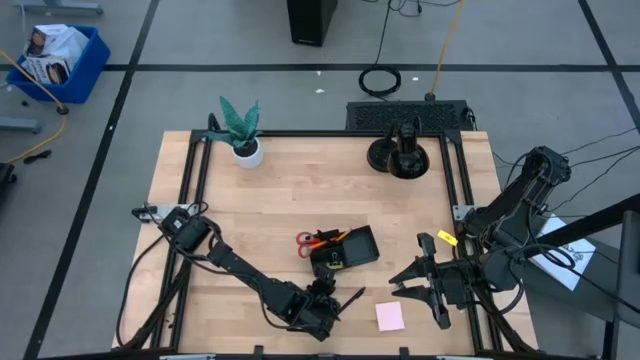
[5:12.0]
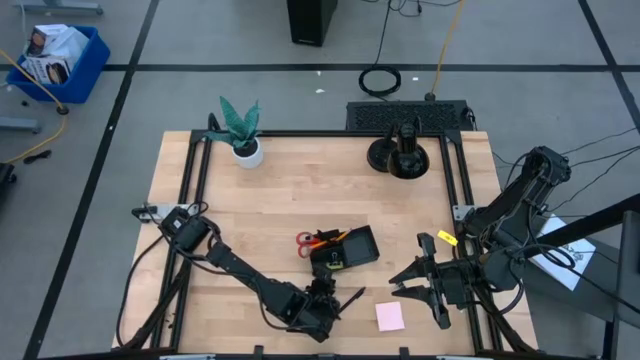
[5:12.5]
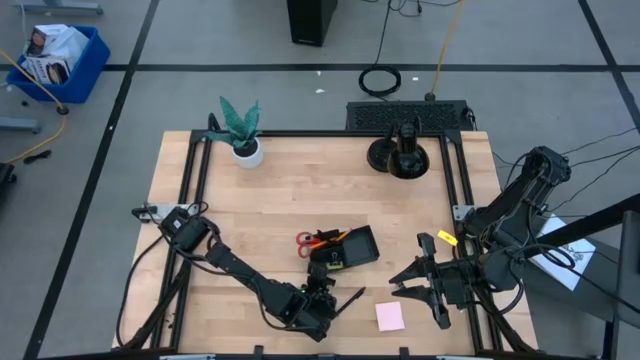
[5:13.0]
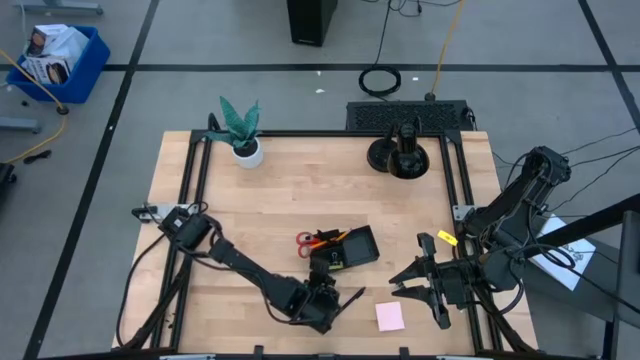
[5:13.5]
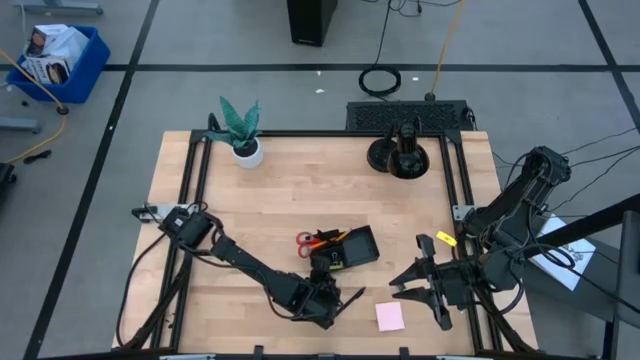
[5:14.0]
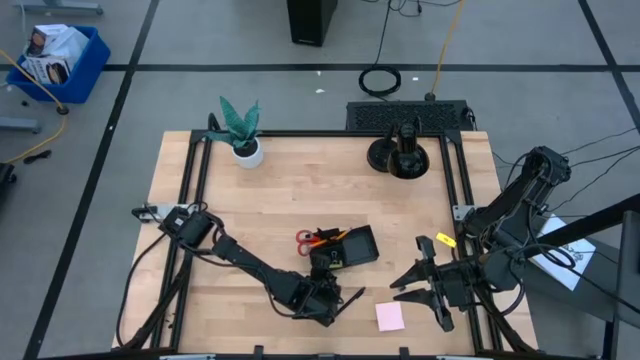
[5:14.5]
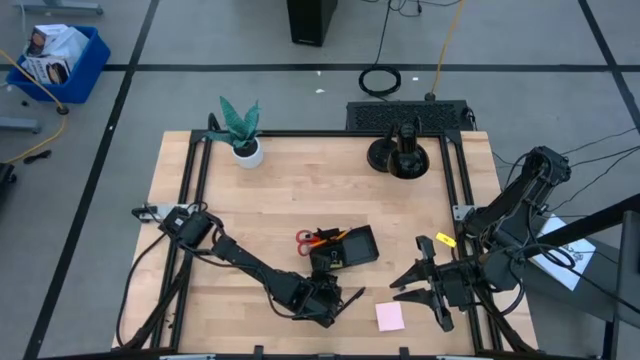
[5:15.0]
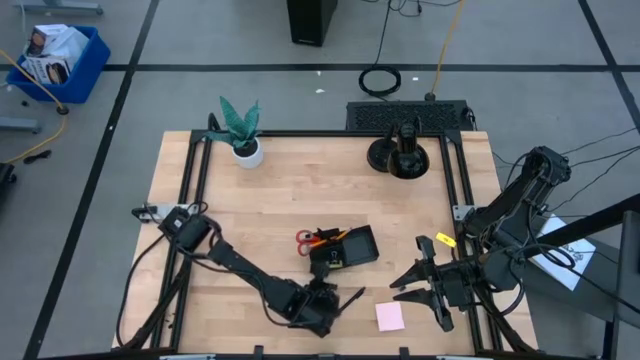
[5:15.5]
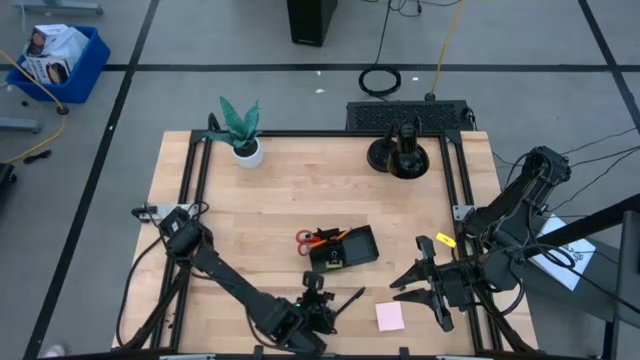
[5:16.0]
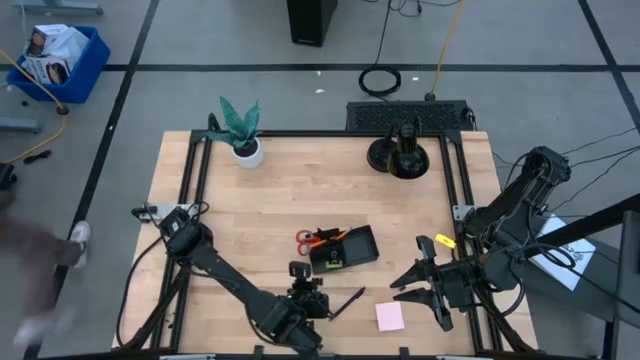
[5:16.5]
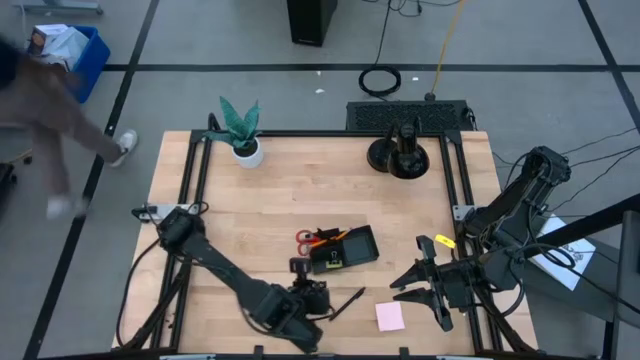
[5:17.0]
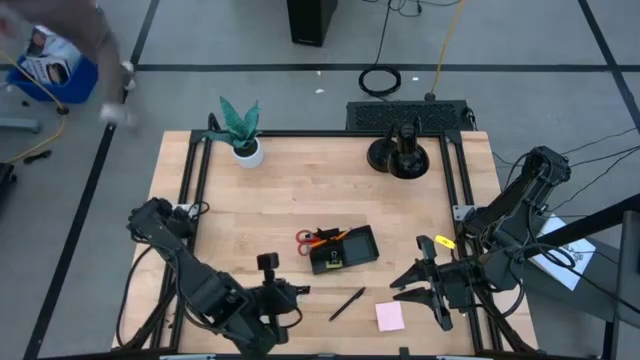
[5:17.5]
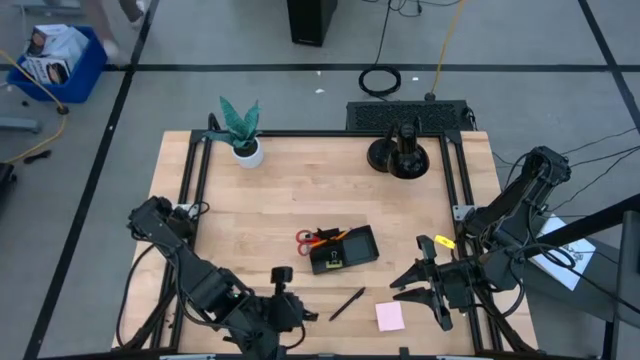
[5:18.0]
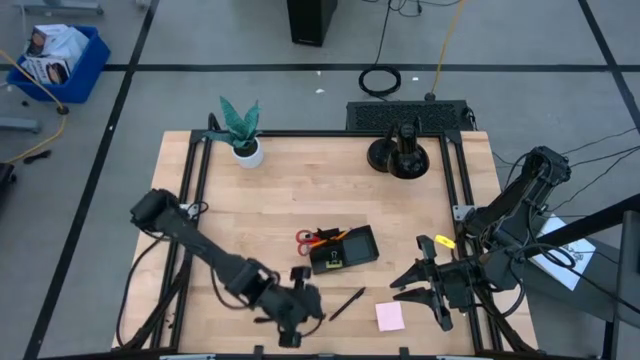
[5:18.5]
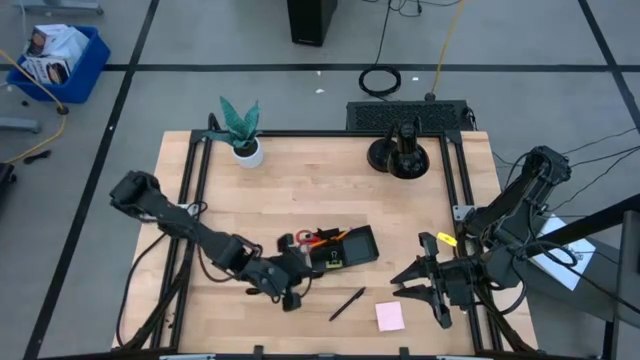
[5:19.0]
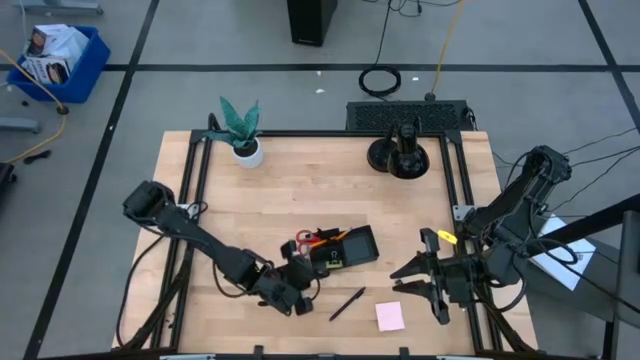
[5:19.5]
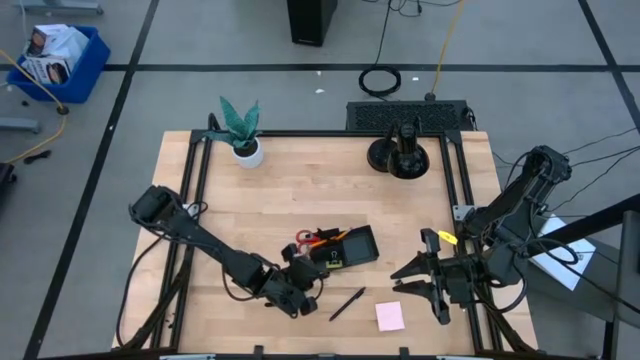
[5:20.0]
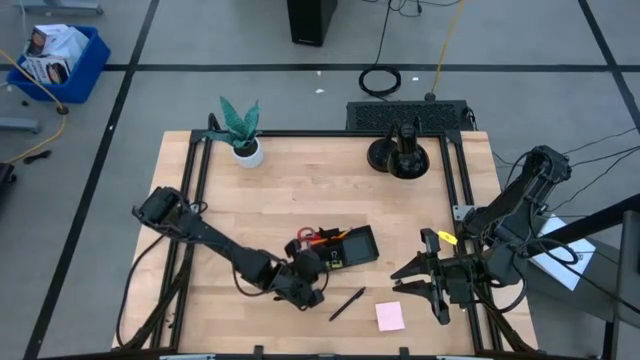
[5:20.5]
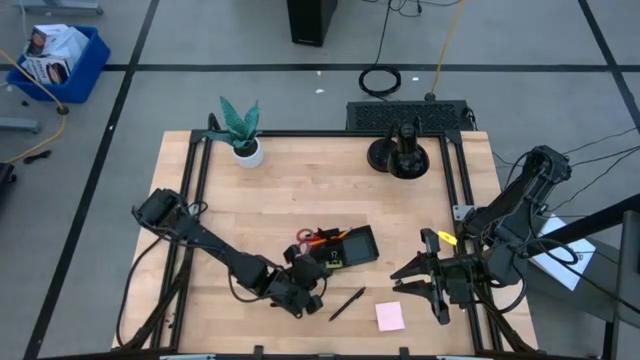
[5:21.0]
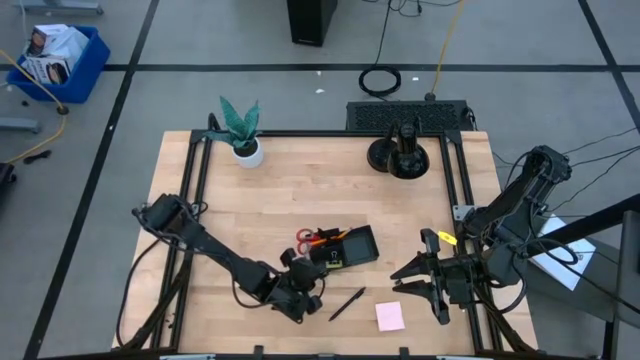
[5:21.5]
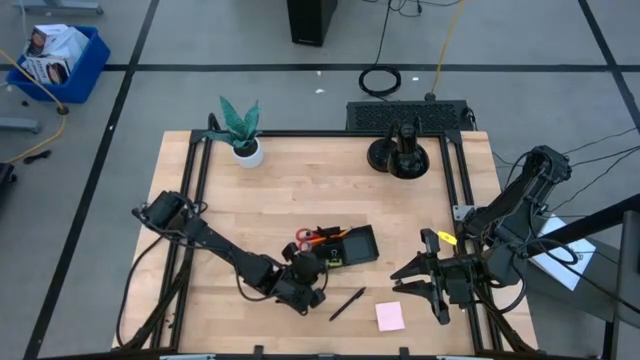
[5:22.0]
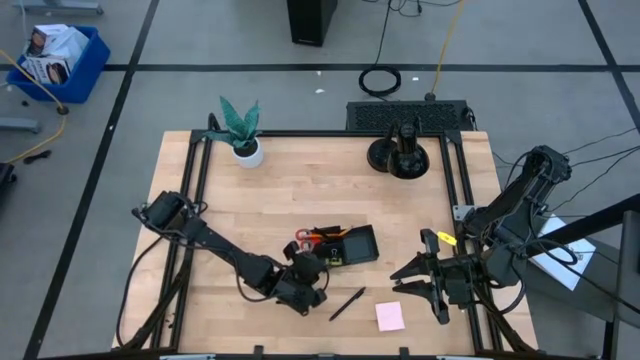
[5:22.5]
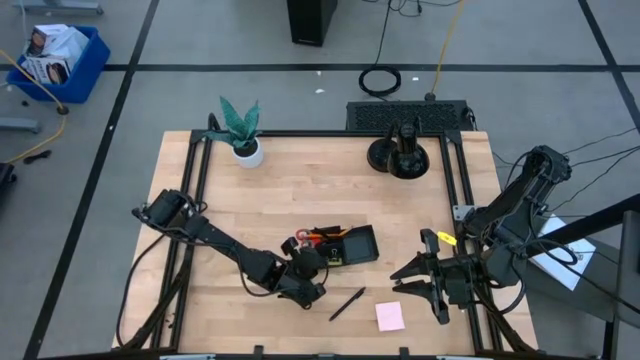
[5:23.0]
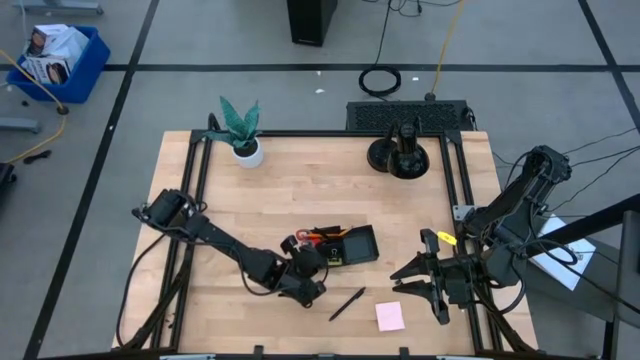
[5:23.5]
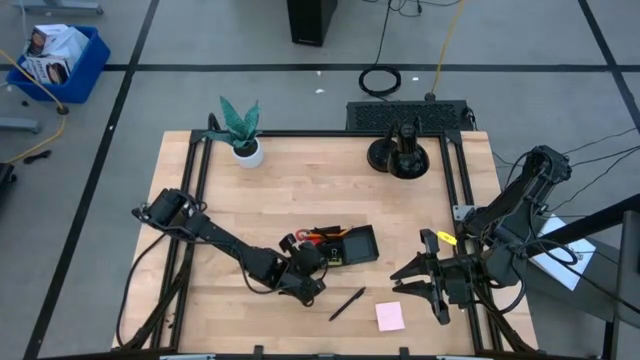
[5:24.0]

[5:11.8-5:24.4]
Task: Pick and place office supplies into organizer
Put the left black binder clip into the black desk organizer

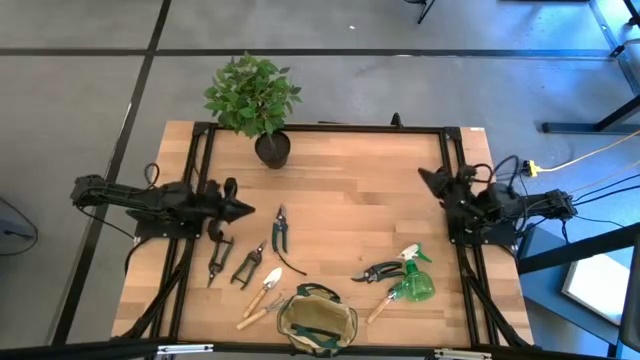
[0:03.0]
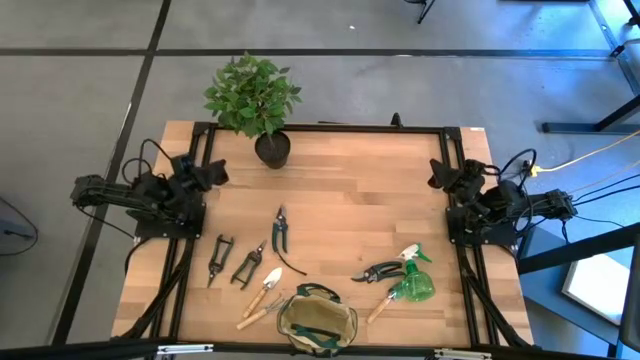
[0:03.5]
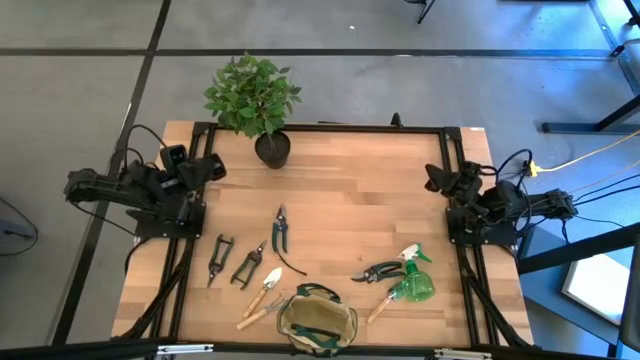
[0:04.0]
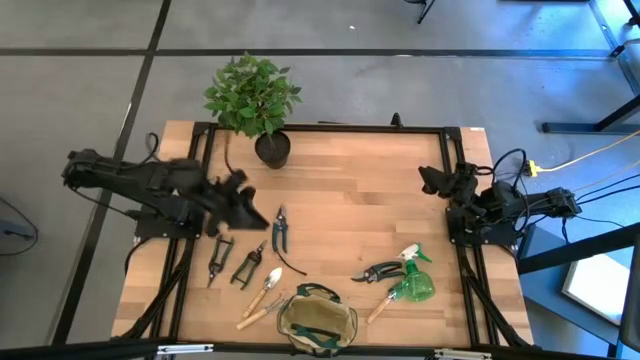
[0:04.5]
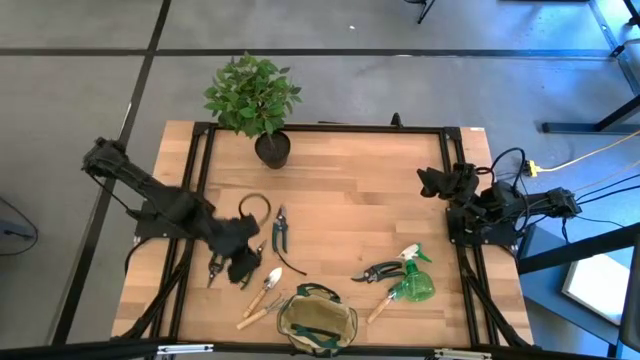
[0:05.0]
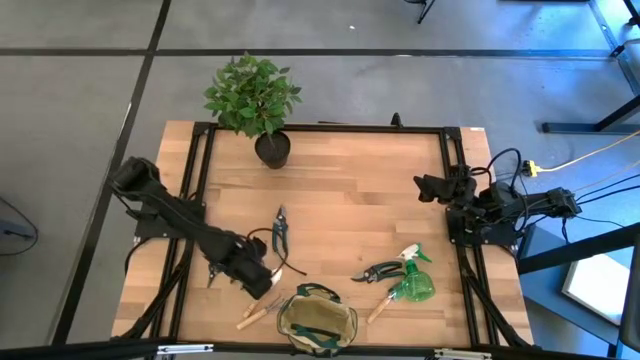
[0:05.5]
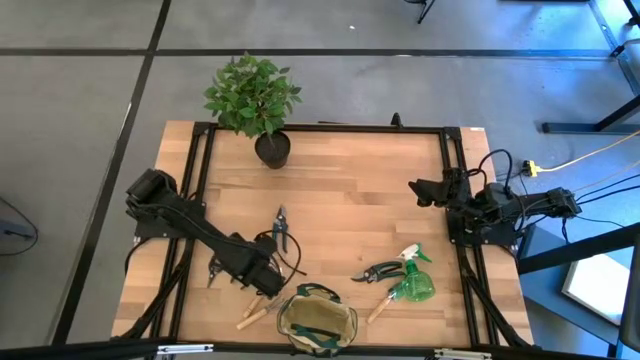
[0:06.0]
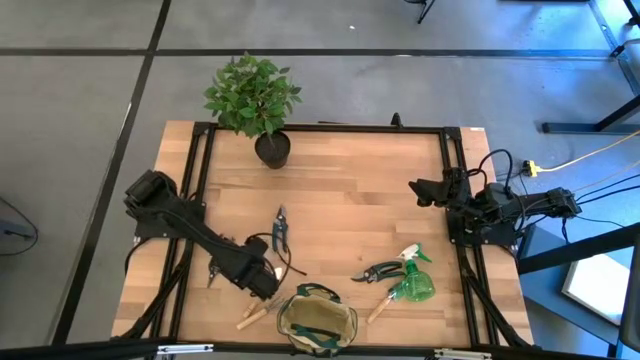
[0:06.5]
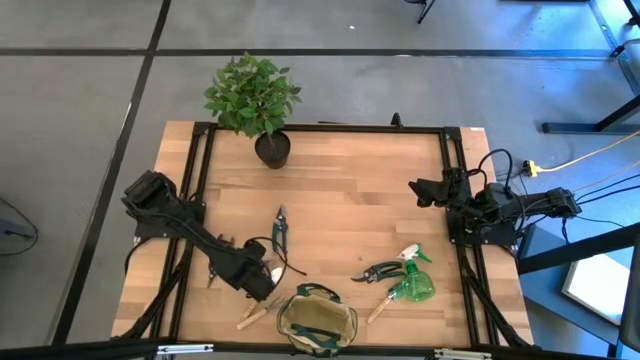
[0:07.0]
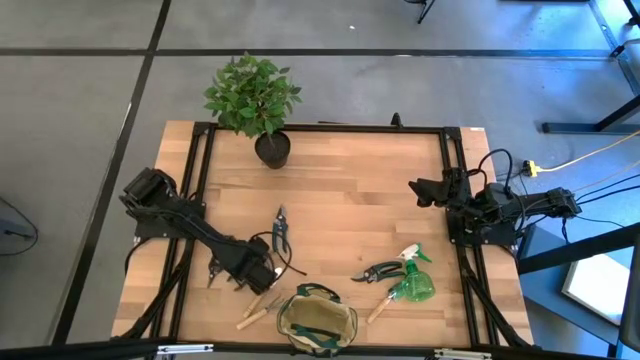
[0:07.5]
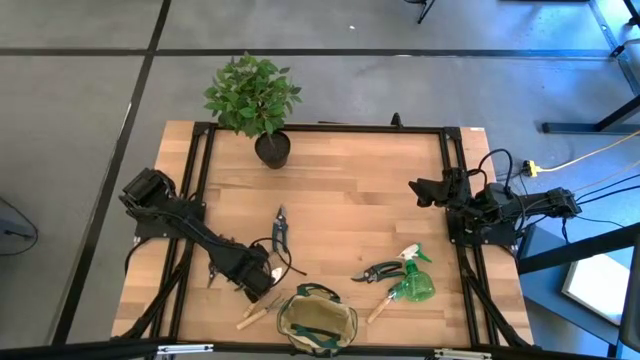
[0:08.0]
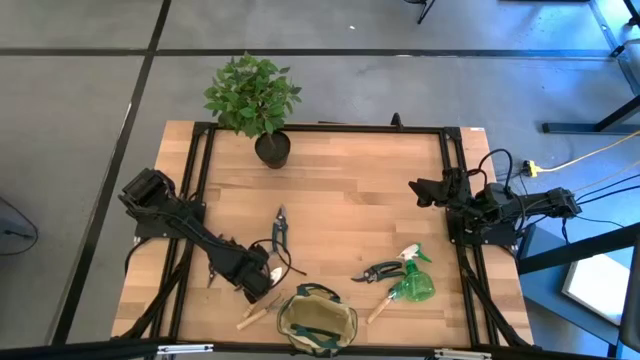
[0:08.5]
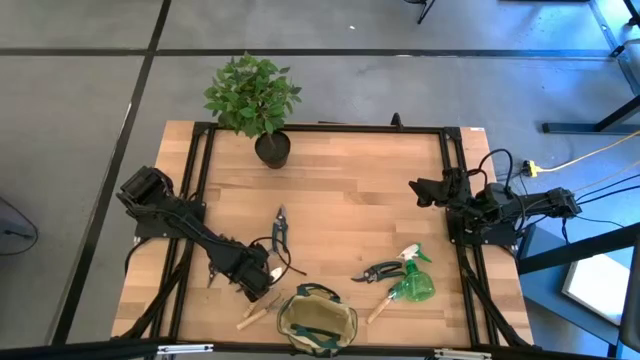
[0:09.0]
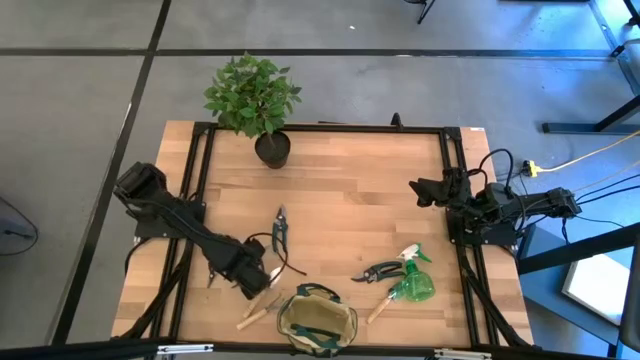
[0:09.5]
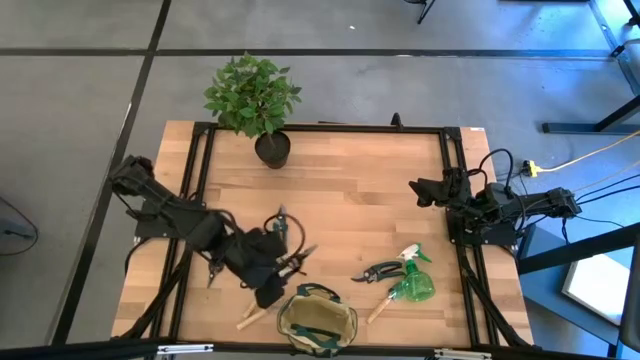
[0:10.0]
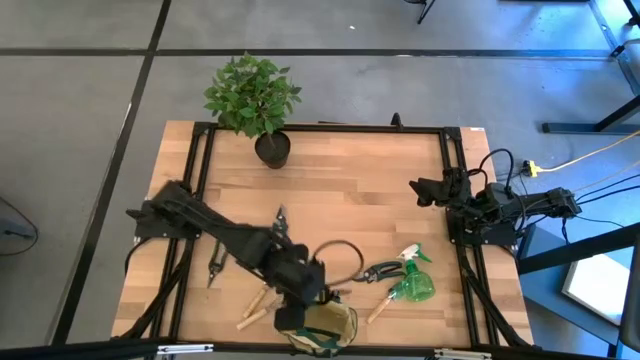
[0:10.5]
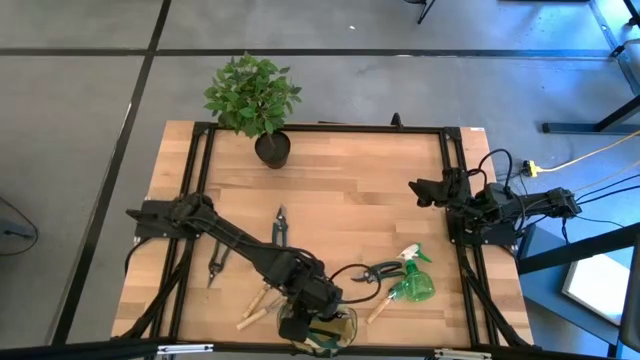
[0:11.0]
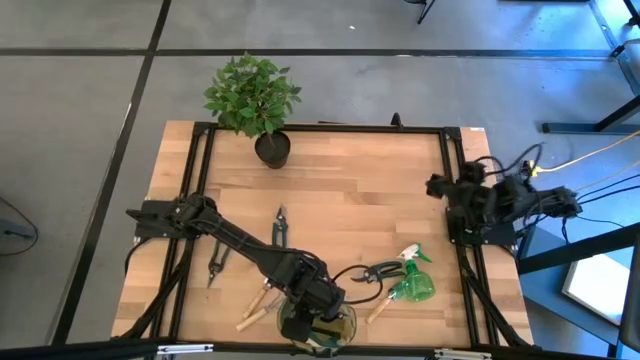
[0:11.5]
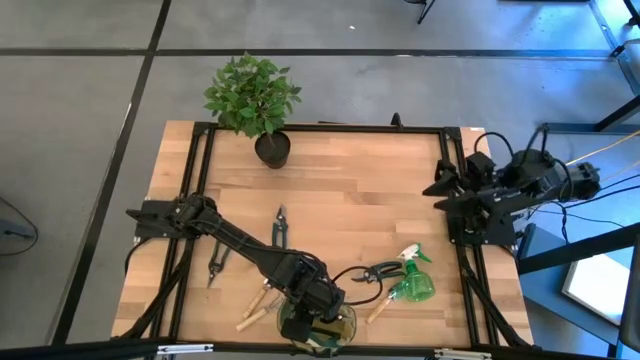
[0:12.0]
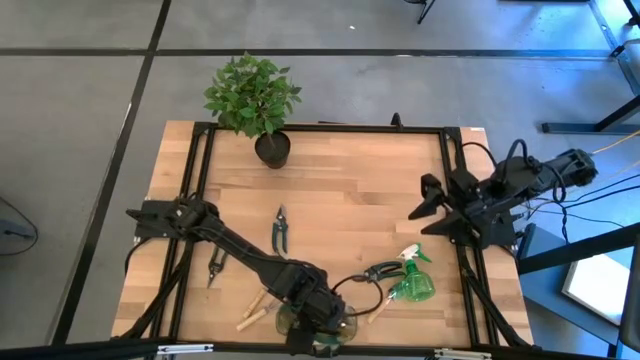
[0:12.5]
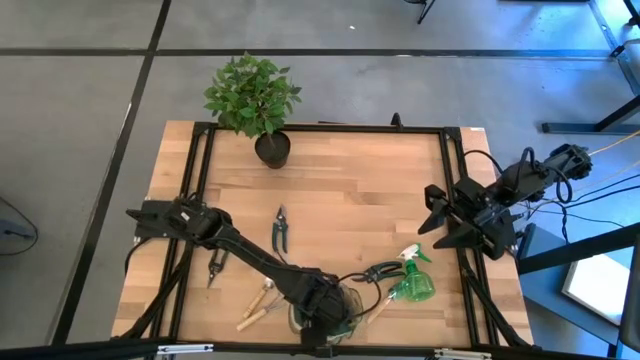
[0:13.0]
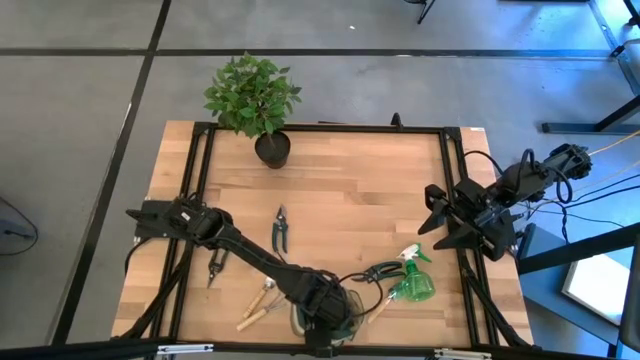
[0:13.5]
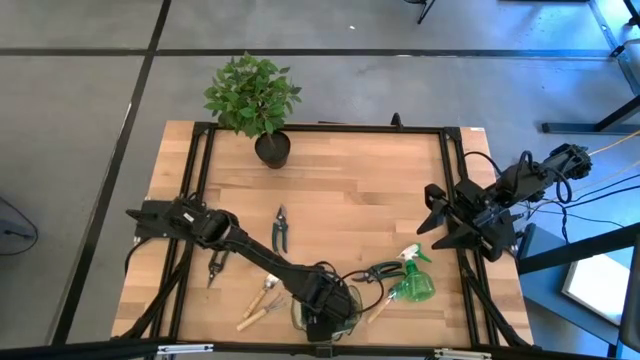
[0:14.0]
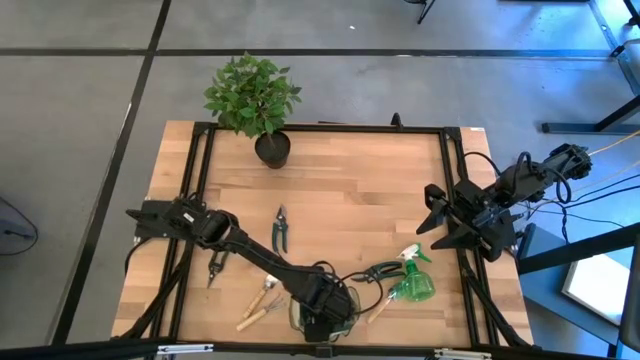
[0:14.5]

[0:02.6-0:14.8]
Task: Pick & Place Garden tools in Gardening bag
Put the right green fruit pruner into the brown gardening bag
